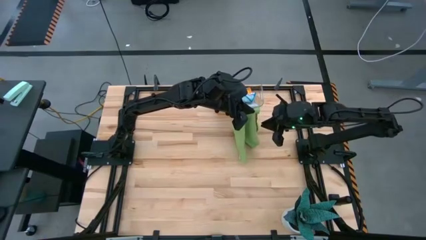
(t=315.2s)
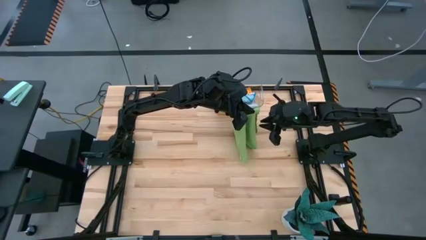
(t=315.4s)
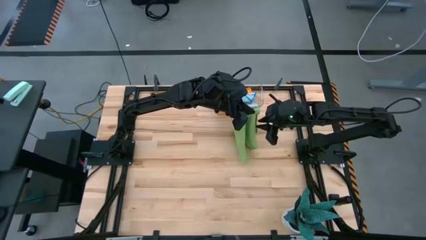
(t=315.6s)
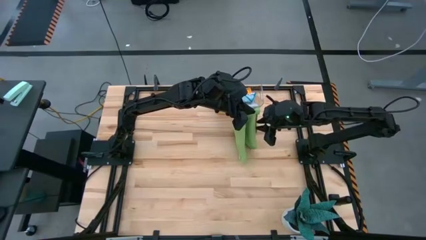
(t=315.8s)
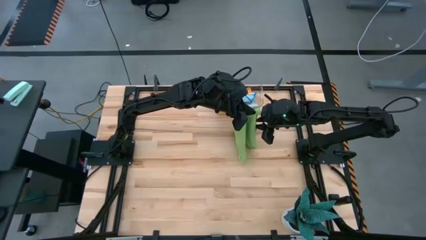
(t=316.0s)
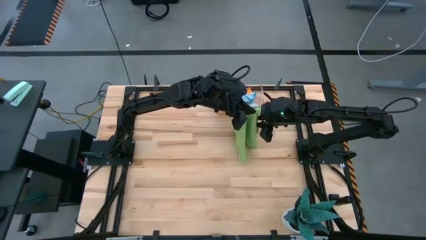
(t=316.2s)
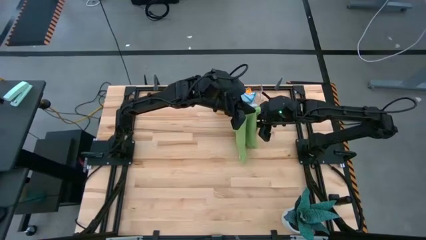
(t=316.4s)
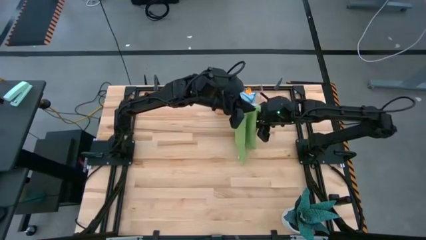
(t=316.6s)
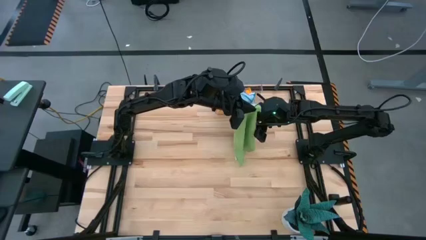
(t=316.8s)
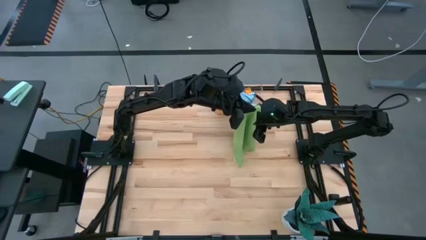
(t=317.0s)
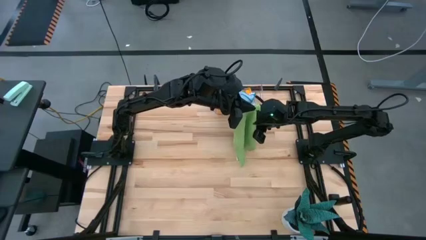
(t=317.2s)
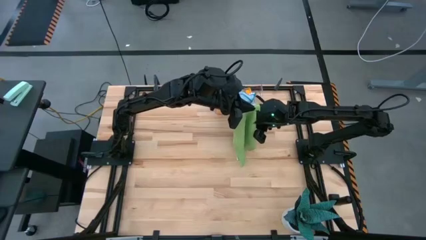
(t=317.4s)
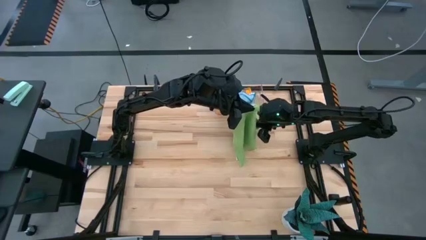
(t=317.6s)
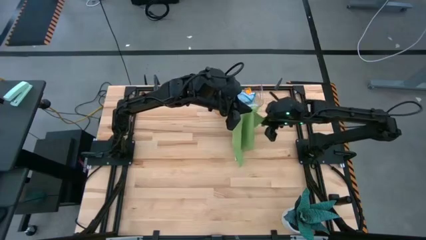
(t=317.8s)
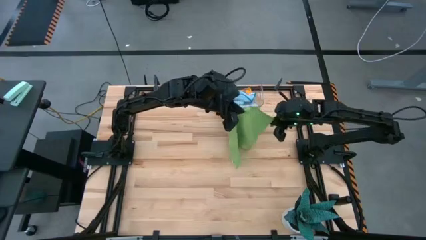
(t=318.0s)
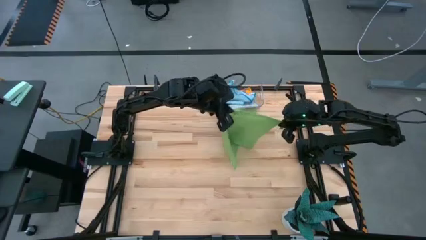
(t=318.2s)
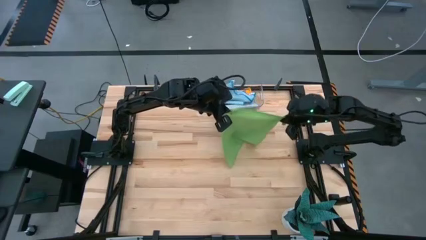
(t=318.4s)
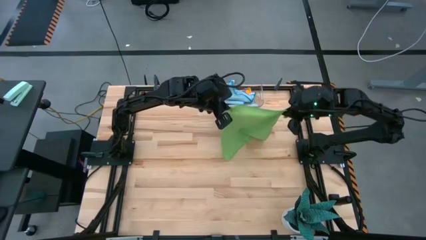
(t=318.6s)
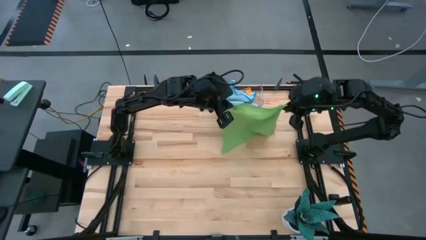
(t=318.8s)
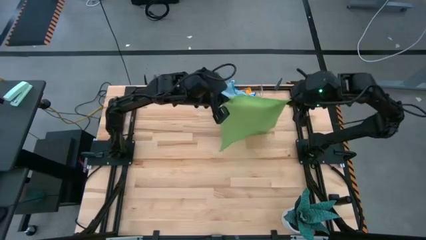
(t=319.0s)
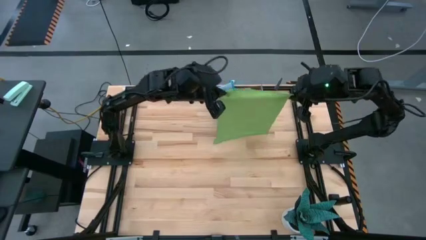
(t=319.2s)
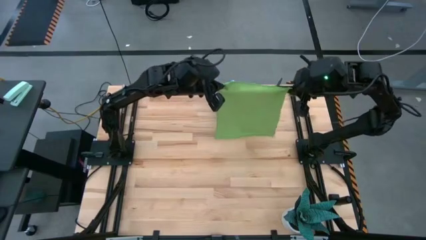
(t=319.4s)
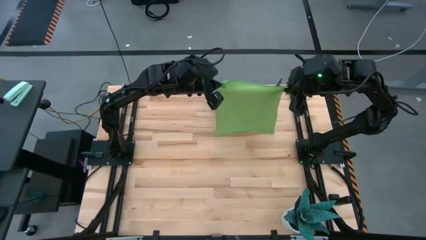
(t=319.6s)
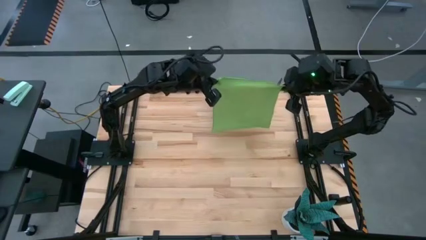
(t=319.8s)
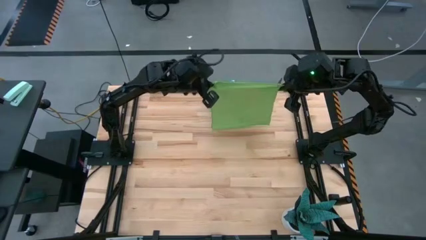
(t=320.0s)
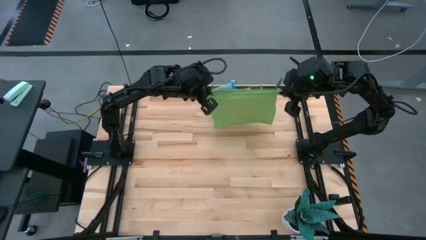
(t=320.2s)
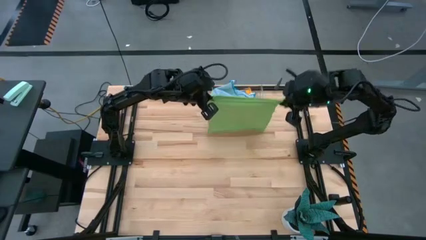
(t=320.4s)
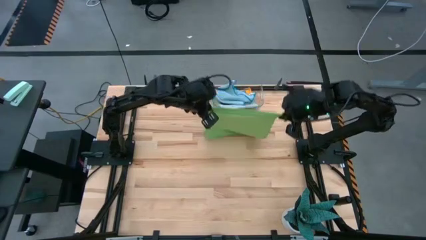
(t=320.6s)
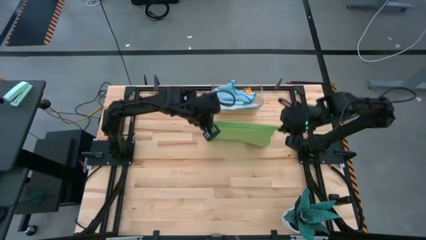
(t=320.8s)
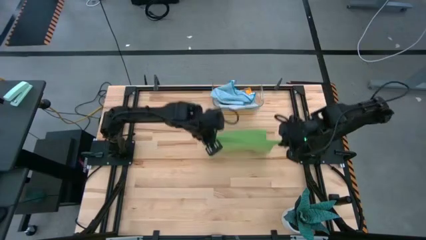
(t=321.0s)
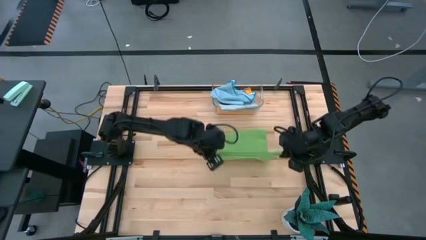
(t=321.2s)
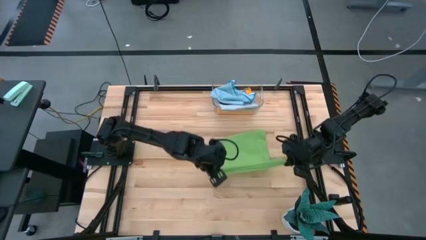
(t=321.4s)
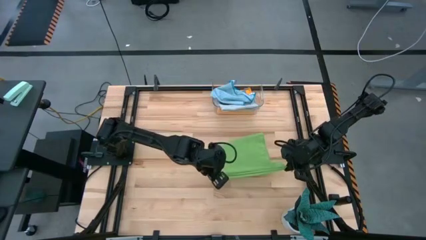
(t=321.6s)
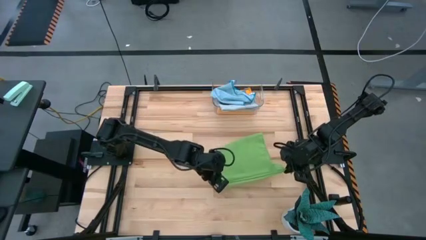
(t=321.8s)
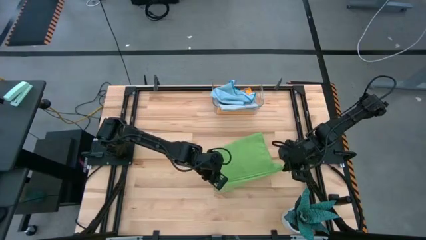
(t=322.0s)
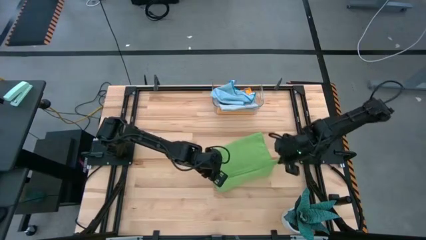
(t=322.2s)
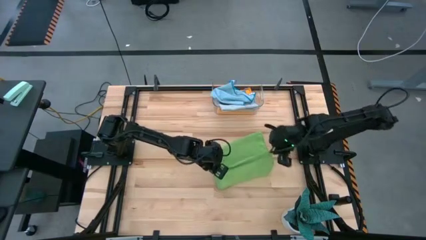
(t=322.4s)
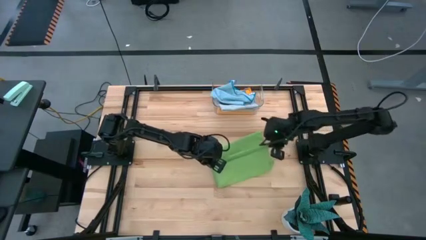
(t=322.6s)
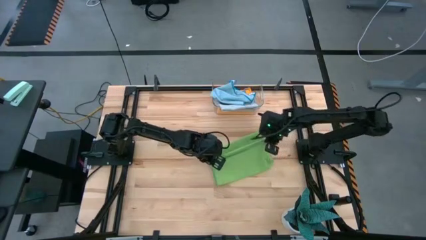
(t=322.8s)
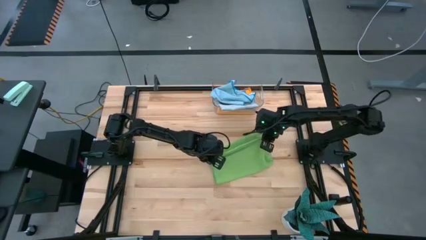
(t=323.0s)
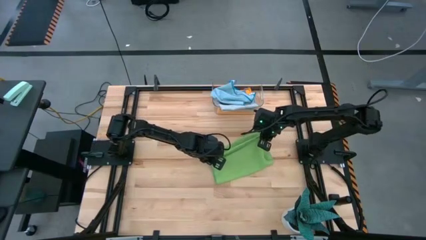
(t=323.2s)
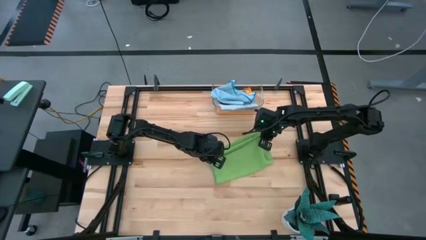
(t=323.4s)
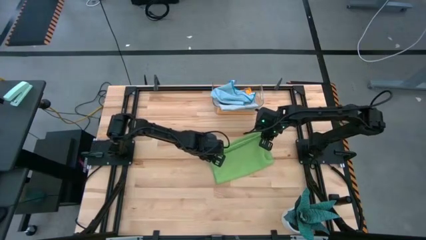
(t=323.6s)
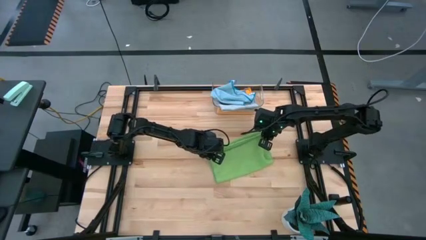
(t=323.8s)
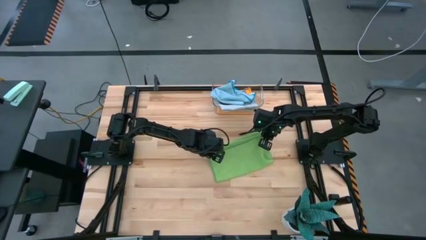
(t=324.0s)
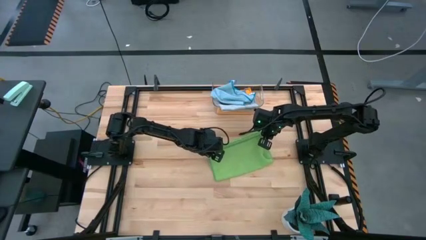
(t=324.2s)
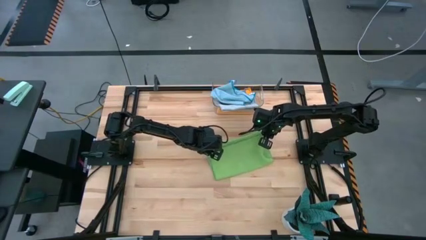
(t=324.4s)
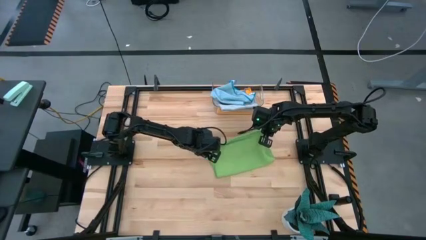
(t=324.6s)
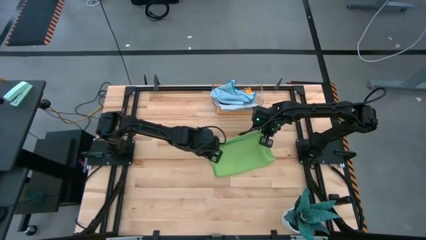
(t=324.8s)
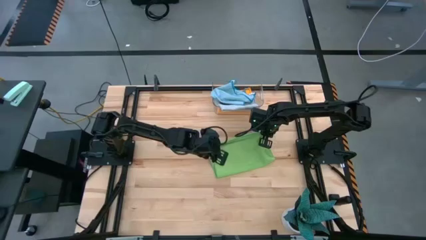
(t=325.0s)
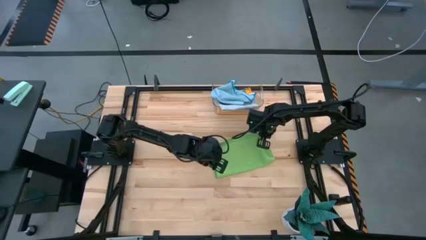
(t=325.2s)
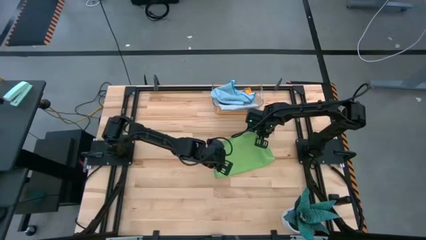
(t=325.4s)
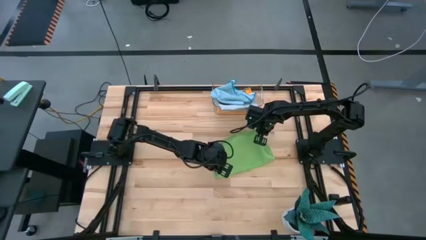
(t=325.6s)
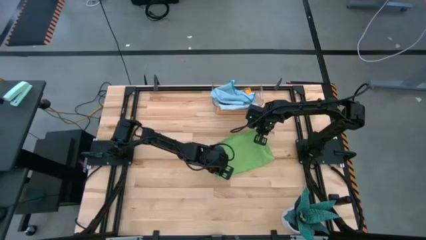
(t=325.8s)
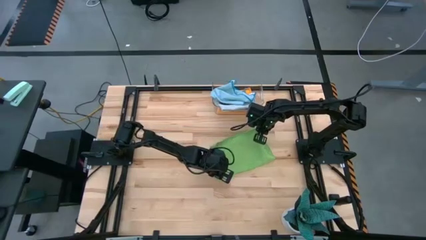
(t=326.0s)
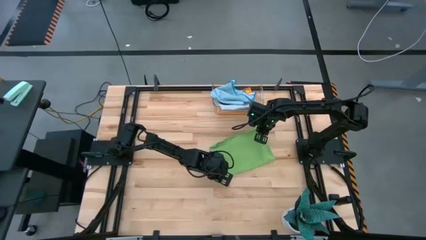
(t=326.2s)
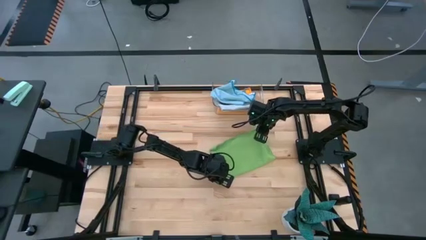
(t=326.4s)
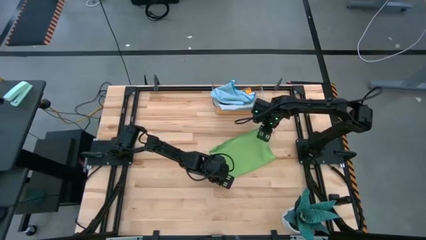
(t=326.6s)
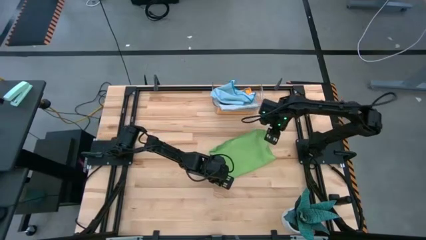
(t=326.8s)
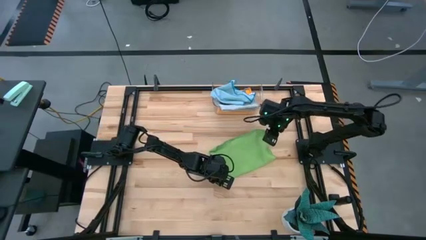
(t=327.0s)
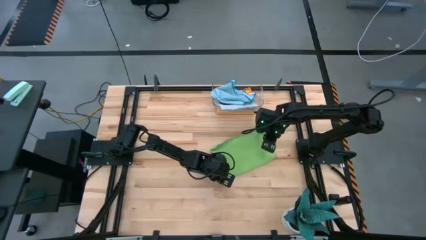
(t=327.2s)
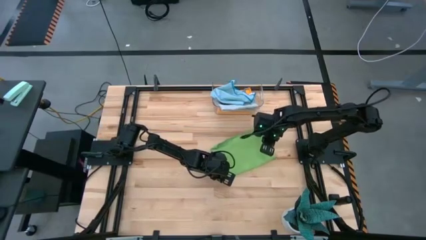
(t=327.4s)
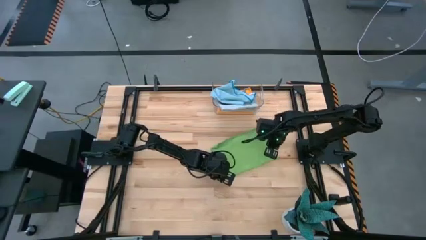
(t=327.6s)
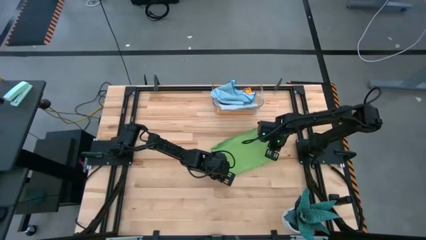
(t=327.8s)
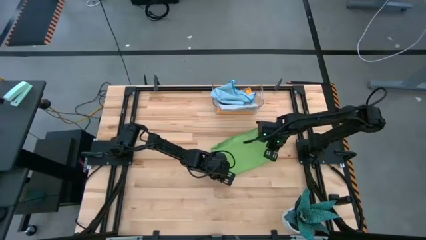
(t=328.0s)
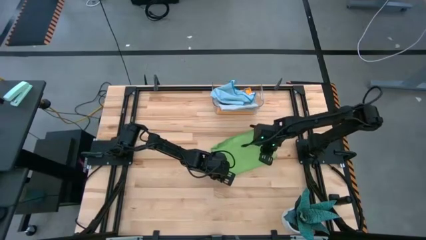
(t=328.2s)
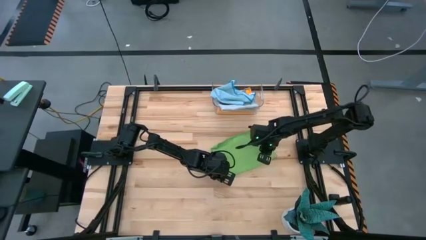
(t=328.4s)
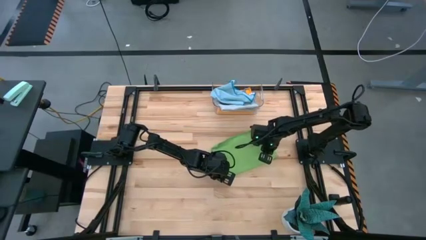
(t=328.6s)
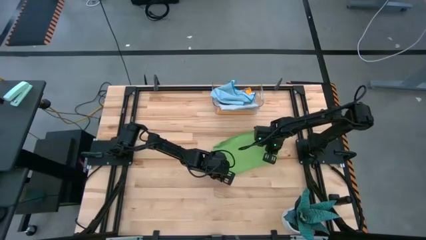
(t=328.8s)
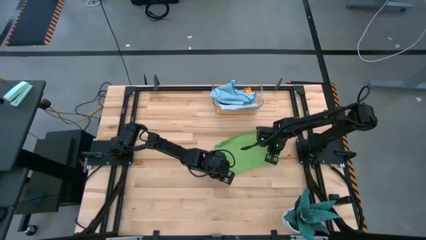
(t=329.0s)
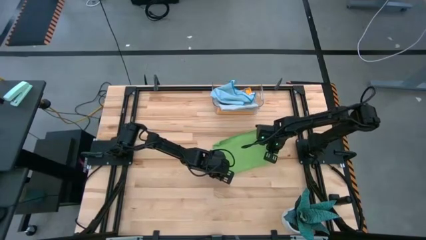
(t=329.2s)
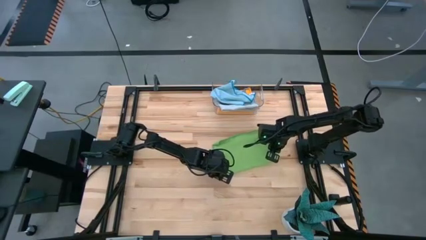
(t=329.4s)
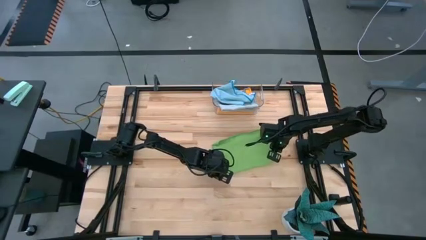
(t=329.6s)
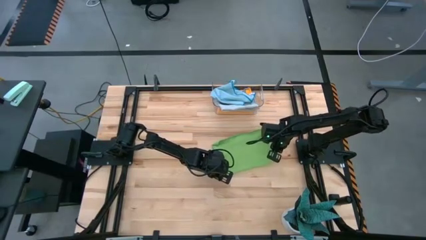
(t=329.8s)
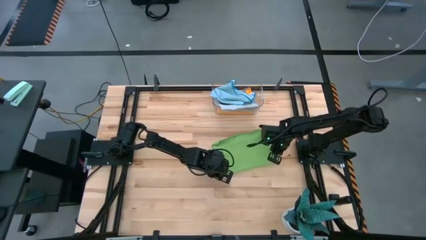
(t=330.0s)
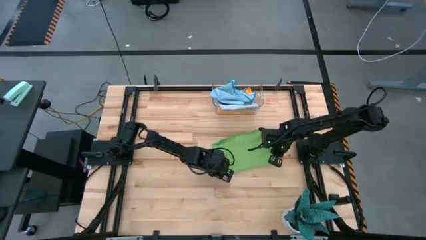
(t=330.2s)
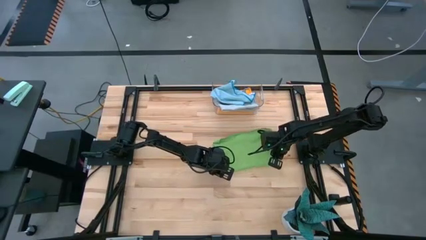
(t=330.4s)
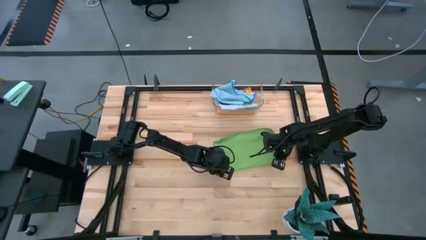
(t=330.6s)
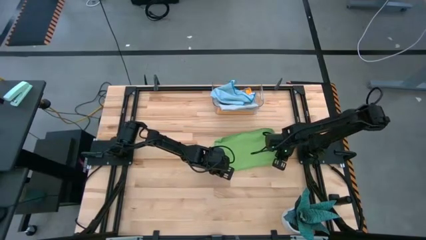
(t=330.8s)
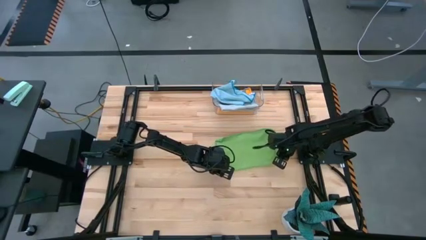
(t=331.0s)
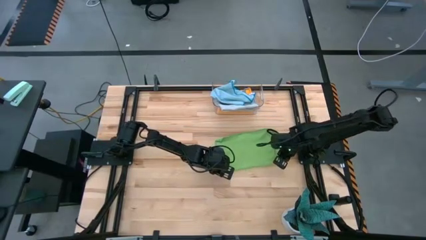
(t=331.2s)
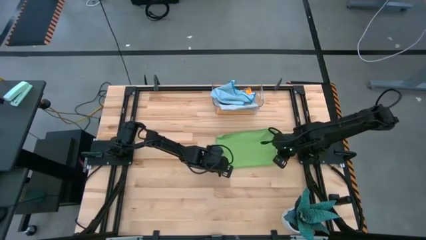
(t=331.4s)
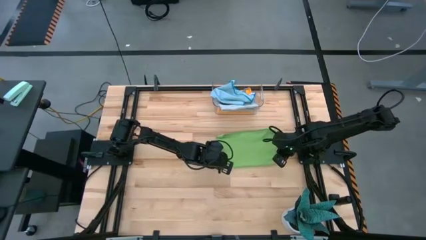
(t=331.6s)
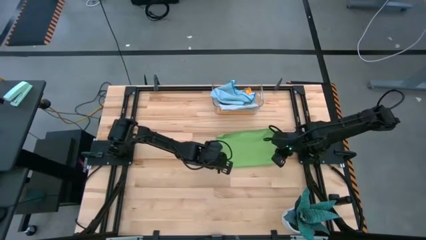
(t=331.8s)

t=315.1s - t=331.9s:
Task: Fold microfiber towels
Fold the green microfiber cloth
